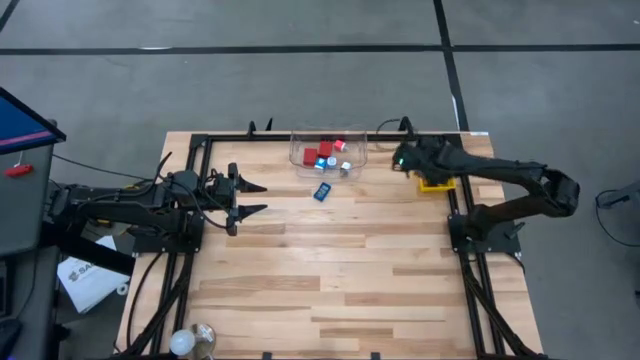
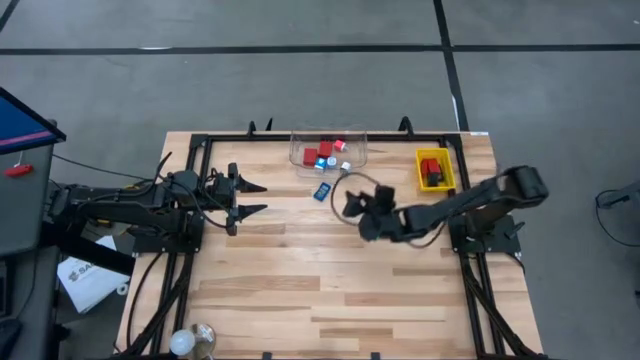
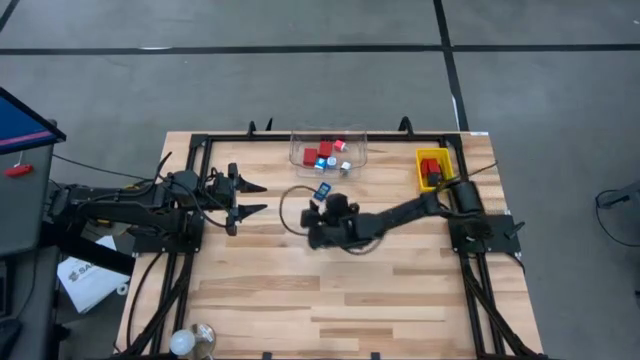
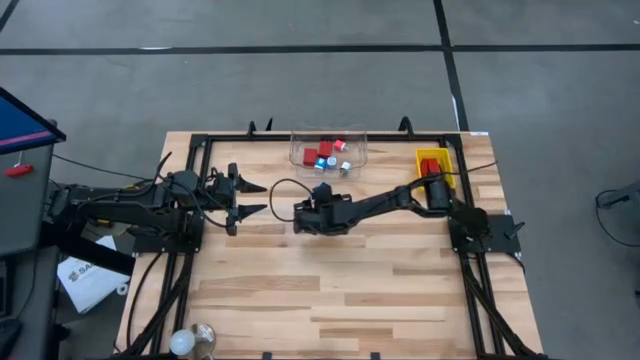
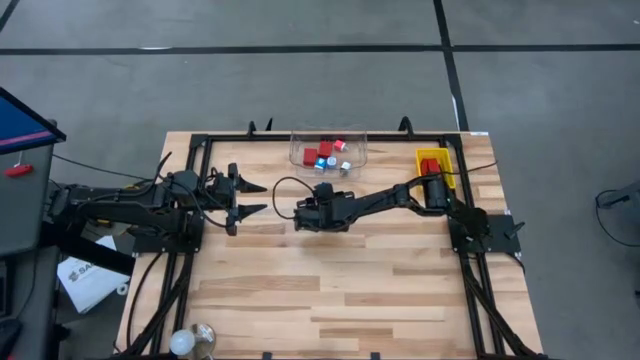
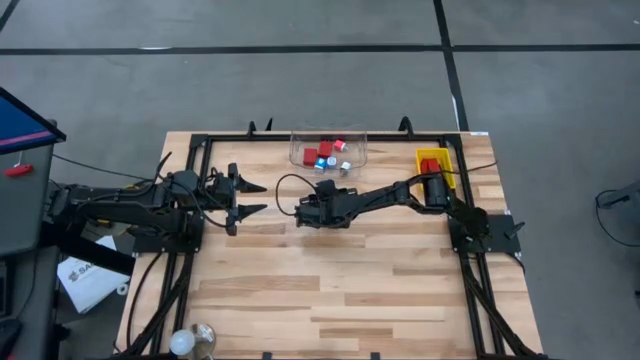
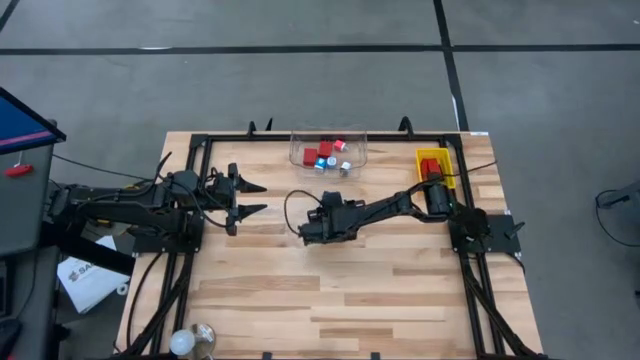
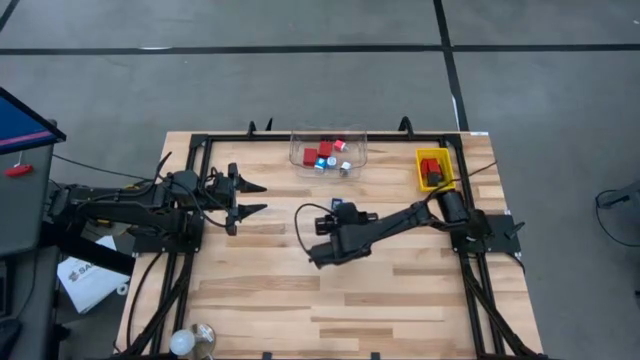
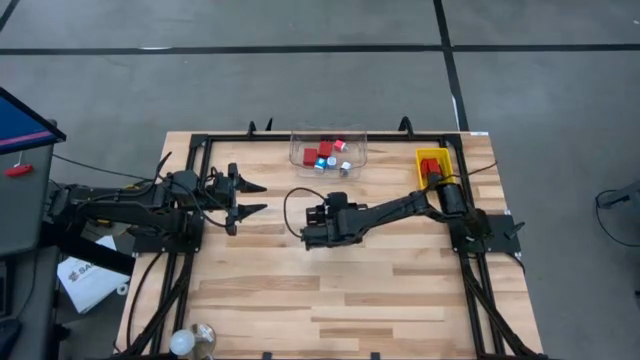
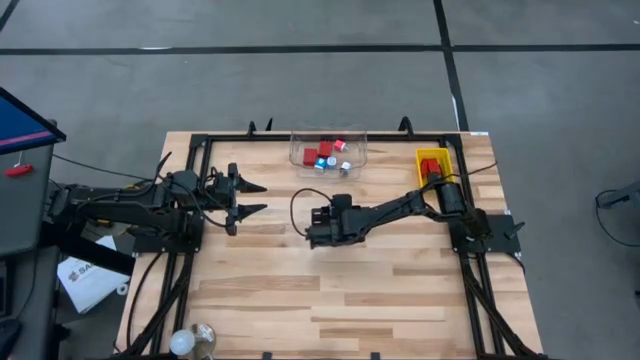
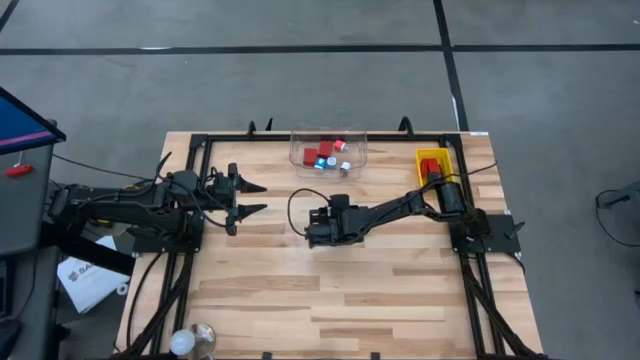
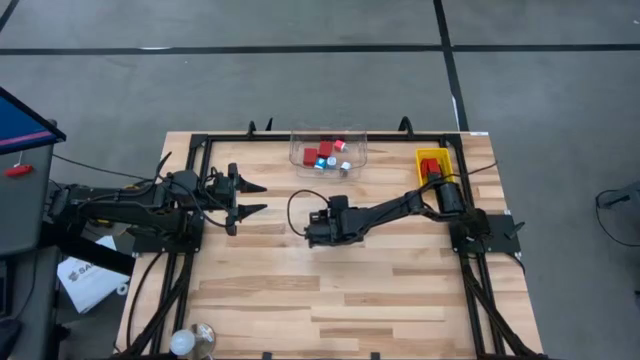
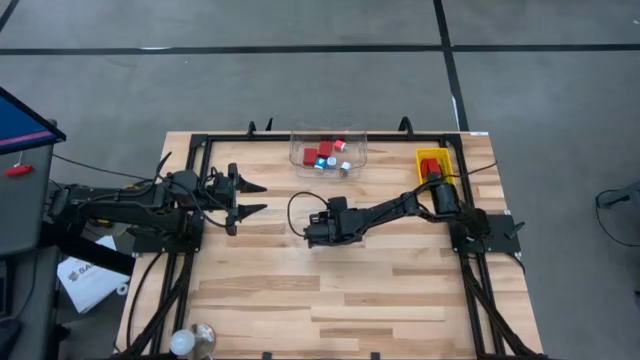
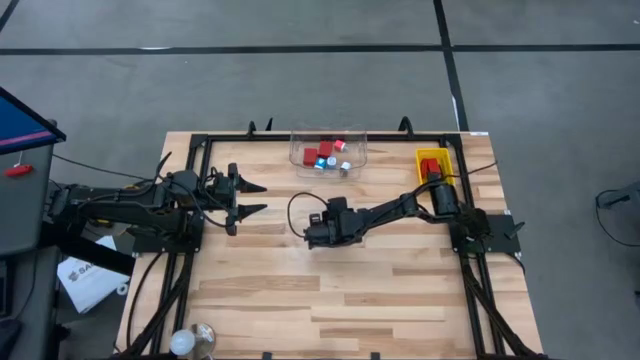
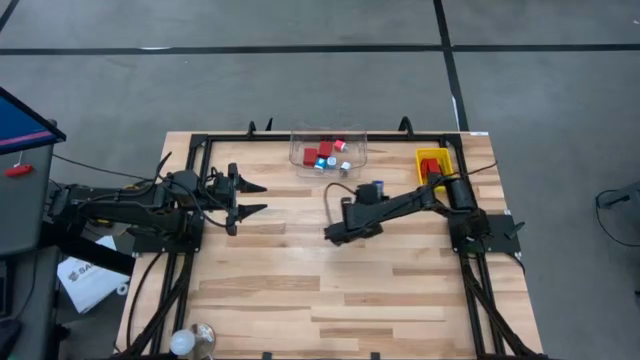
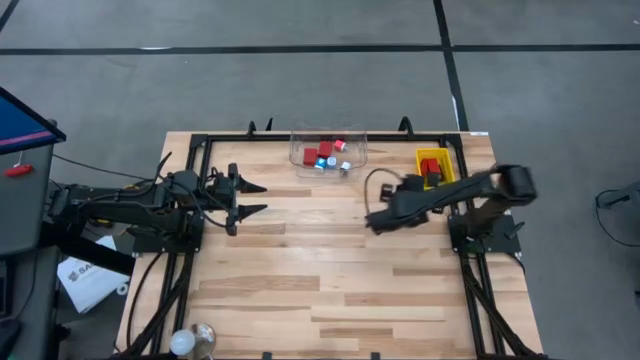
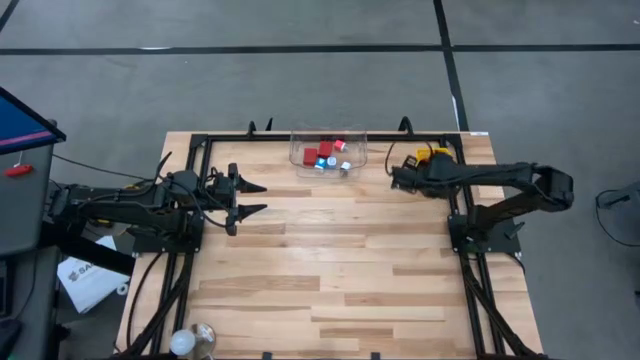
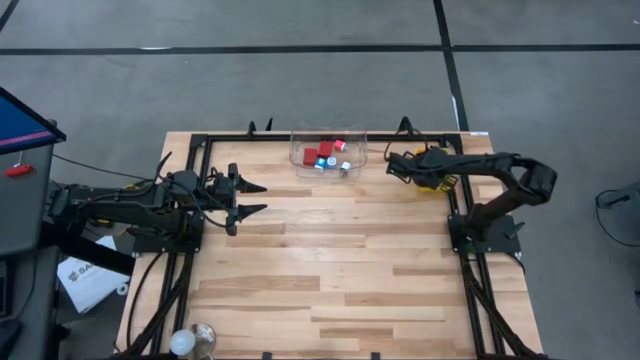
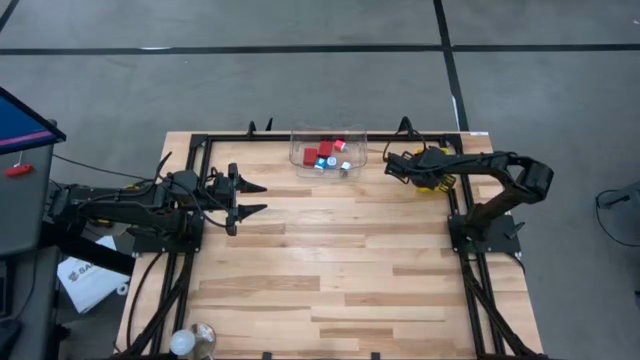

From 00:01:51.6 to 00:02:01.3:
Task: Pick & Place Office items
Put the blue digital clock into the yellow bin

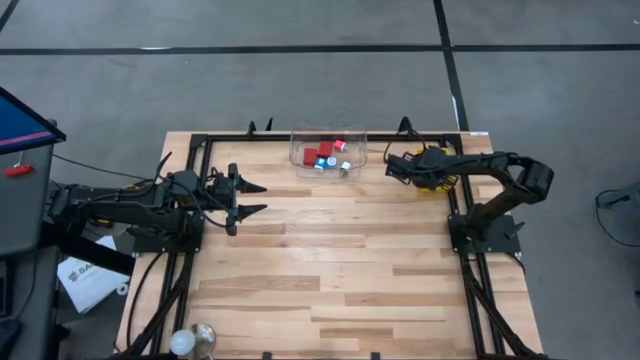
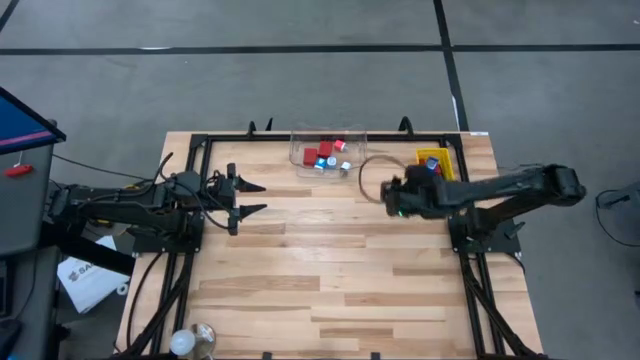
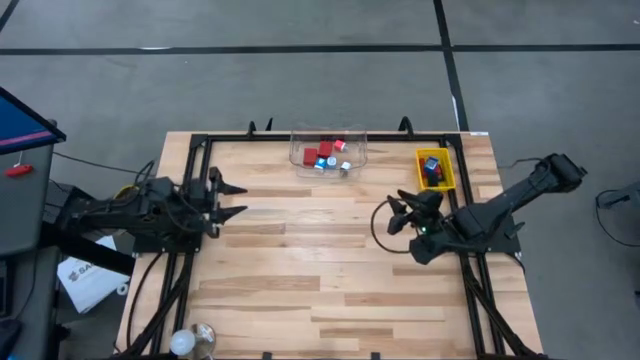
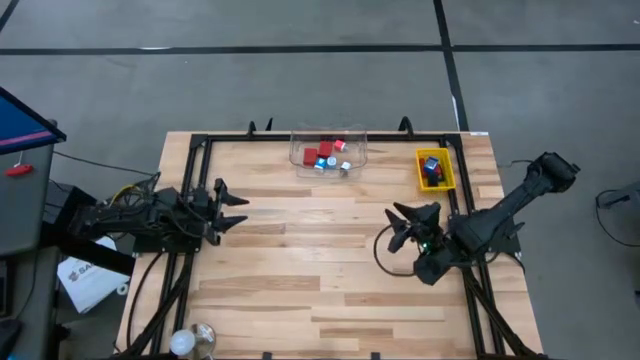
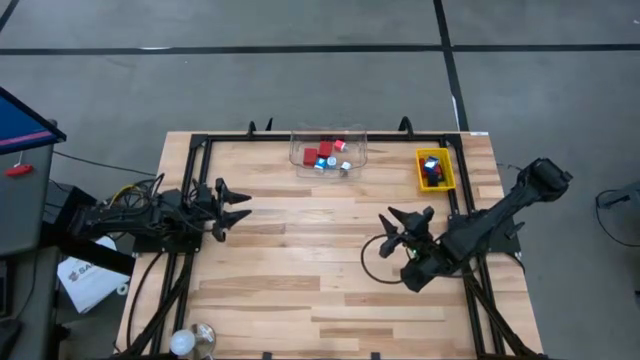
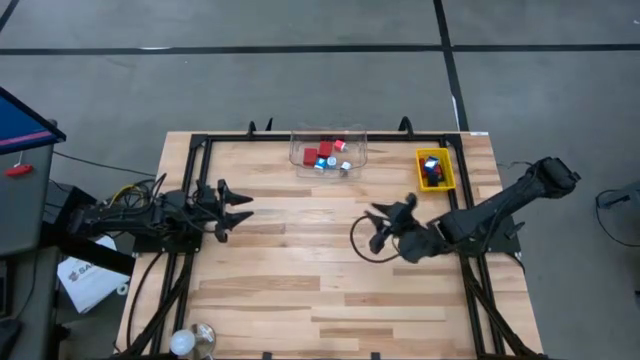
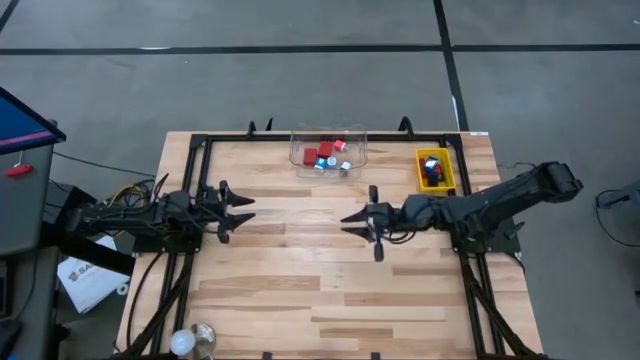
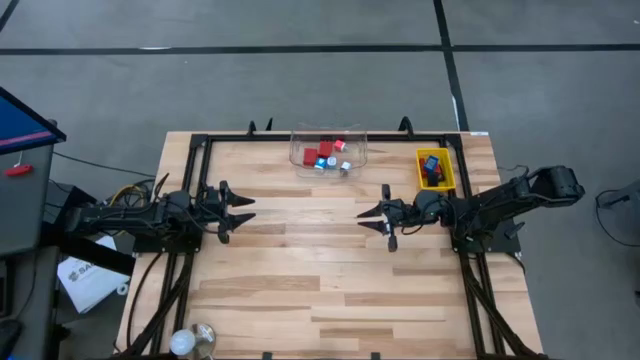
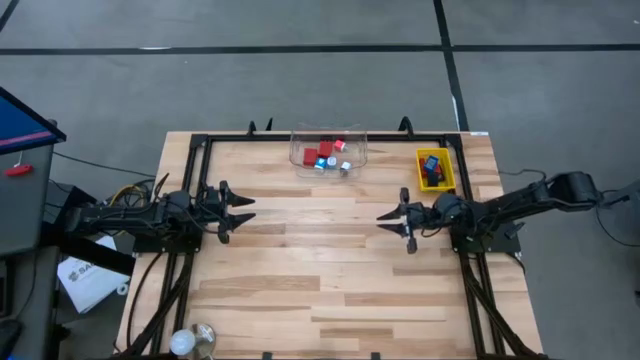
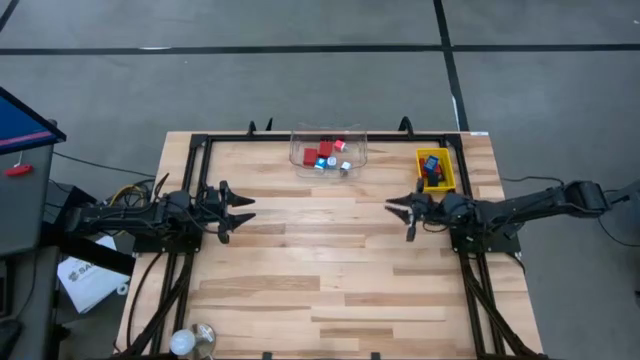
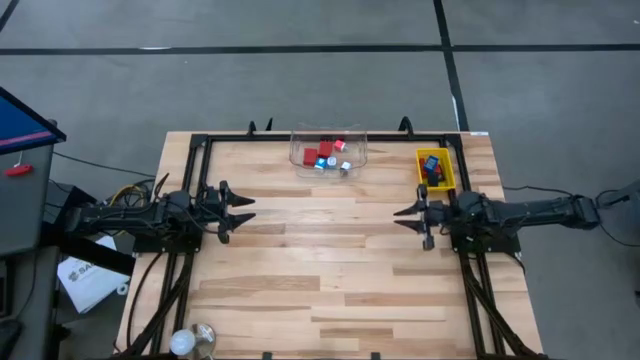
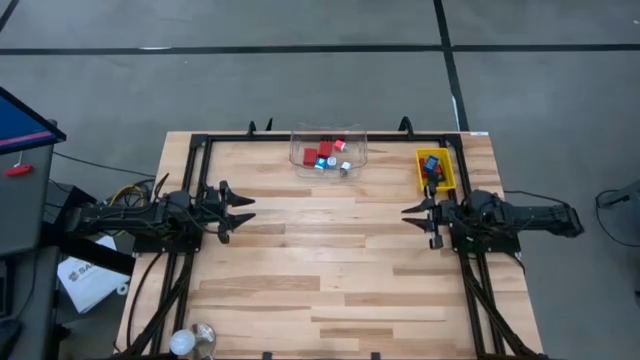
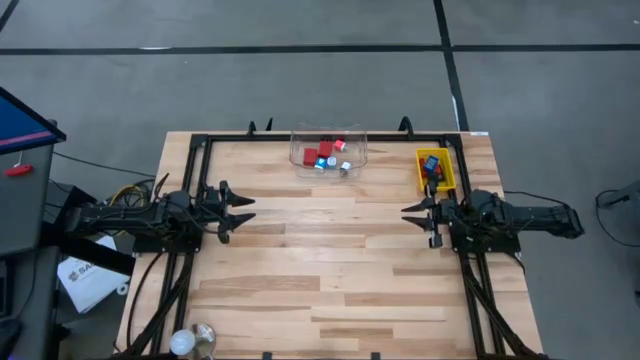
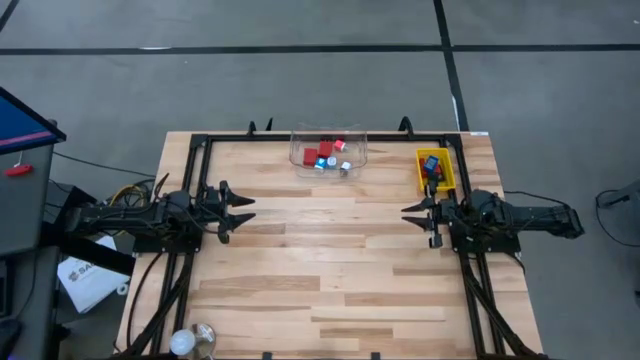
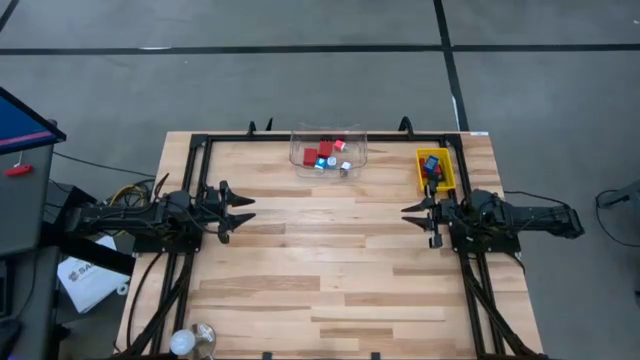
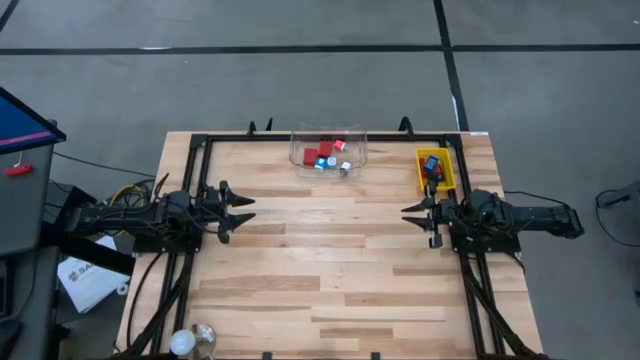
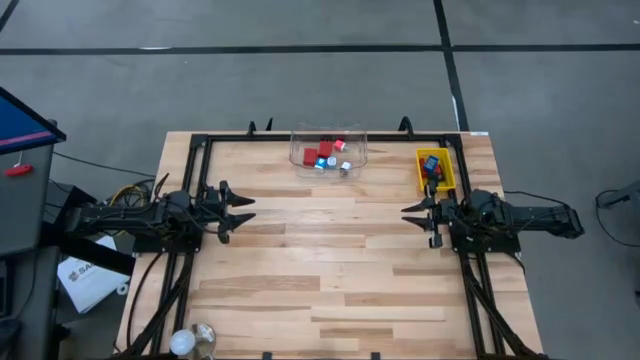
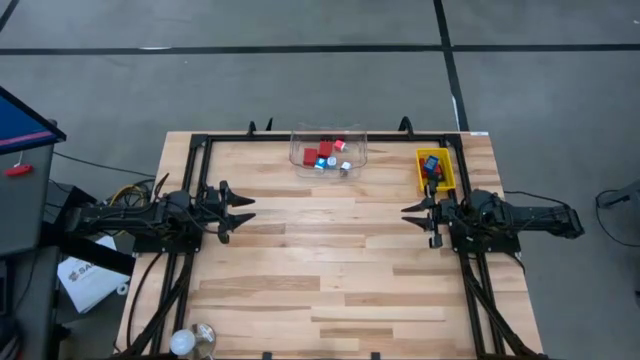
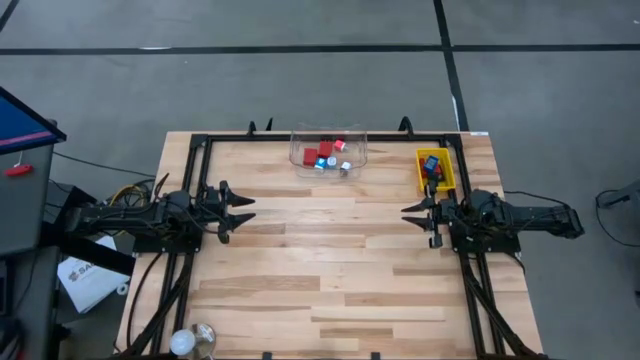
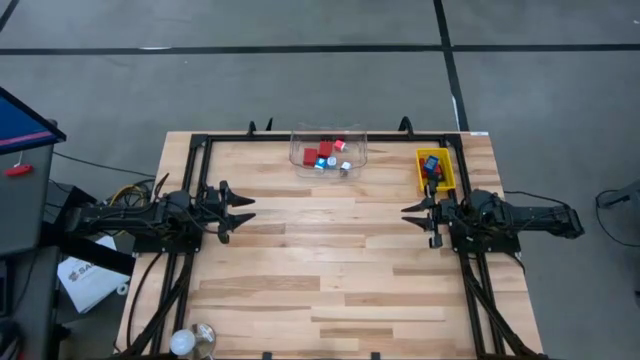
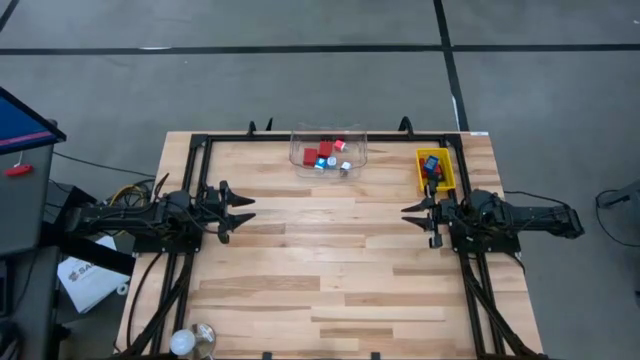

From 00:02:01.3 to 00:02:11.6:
Return to Home Position
